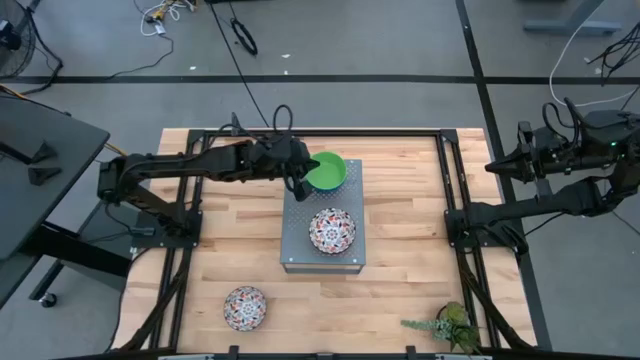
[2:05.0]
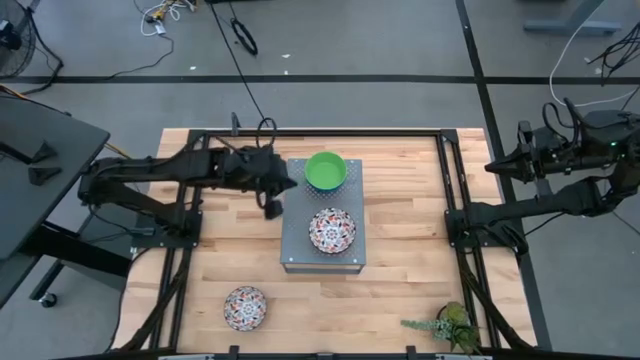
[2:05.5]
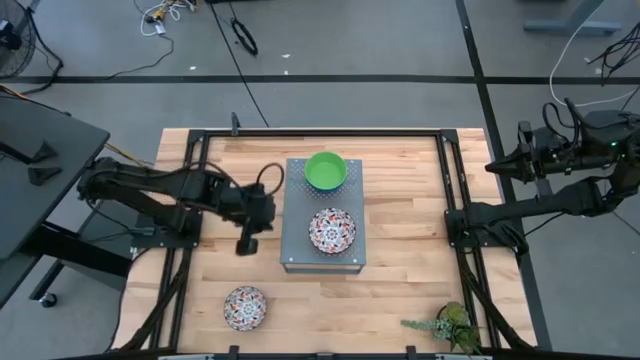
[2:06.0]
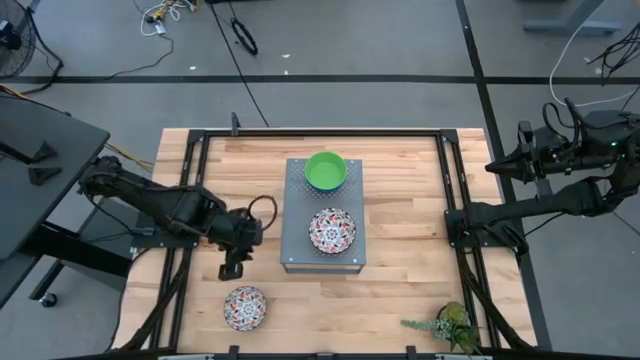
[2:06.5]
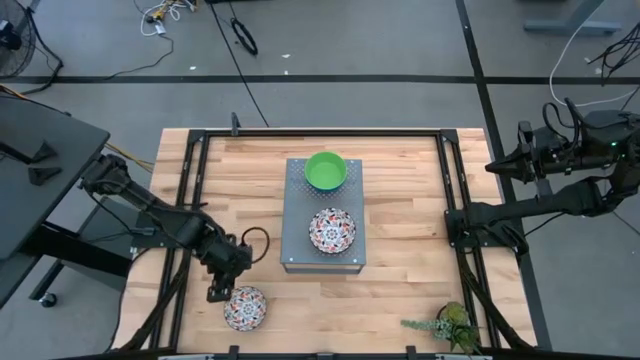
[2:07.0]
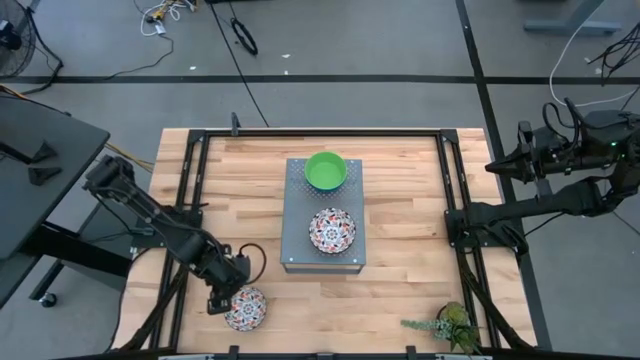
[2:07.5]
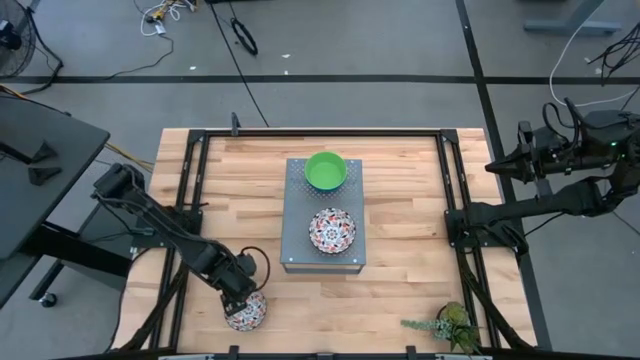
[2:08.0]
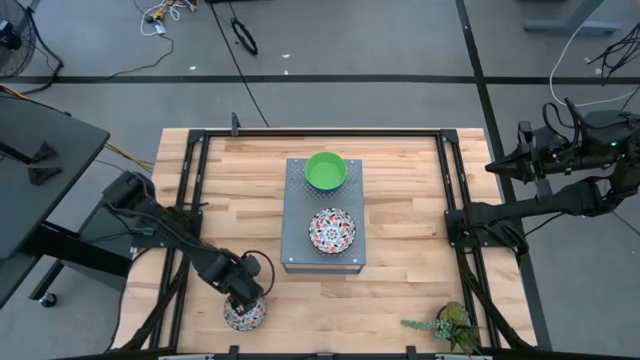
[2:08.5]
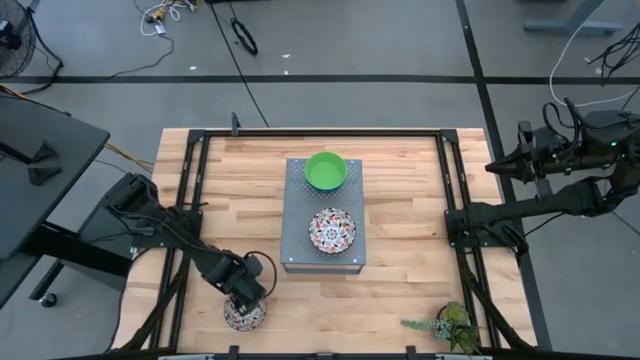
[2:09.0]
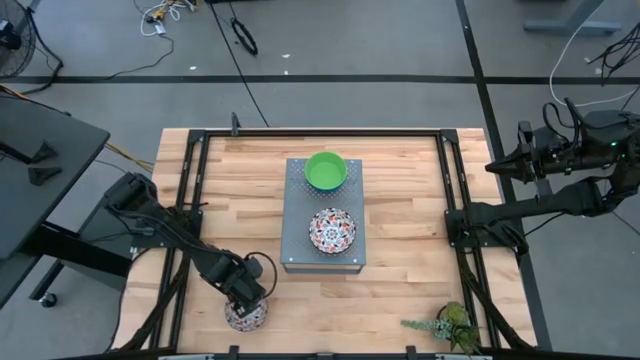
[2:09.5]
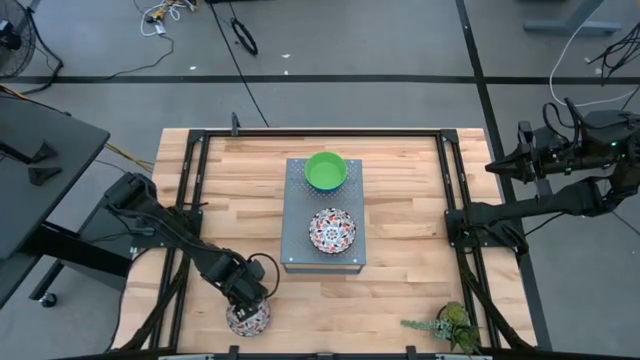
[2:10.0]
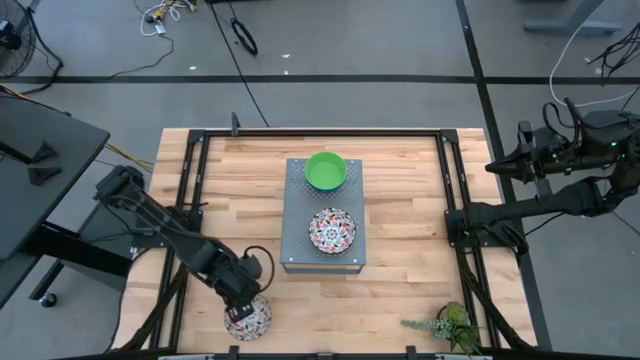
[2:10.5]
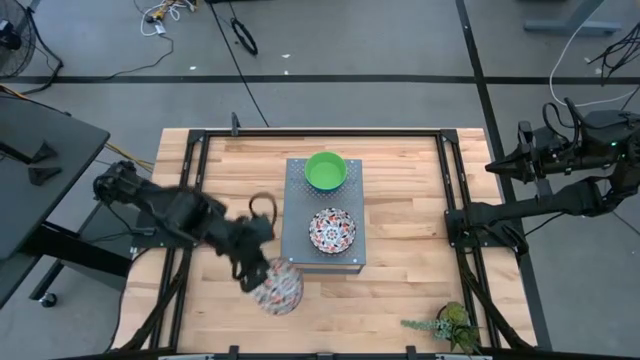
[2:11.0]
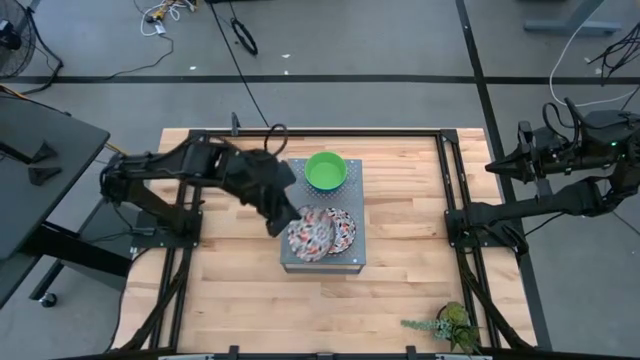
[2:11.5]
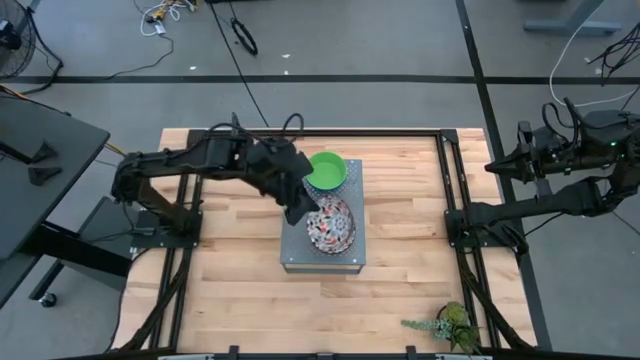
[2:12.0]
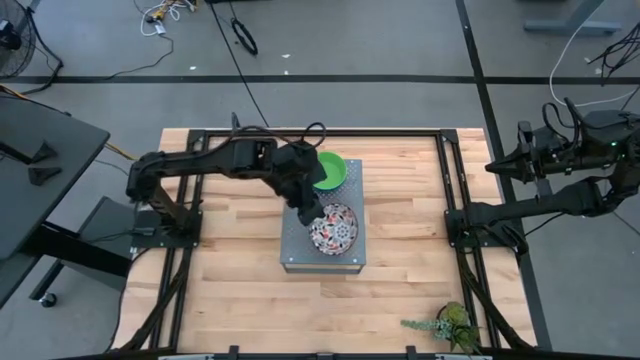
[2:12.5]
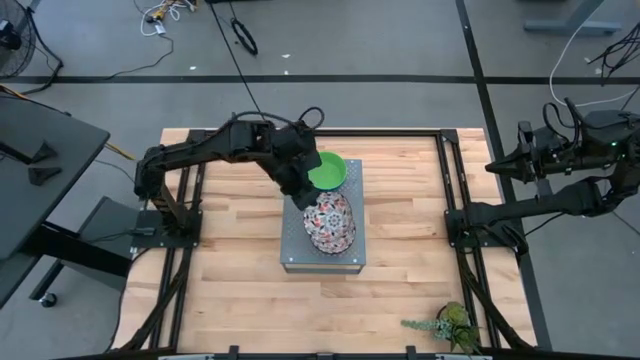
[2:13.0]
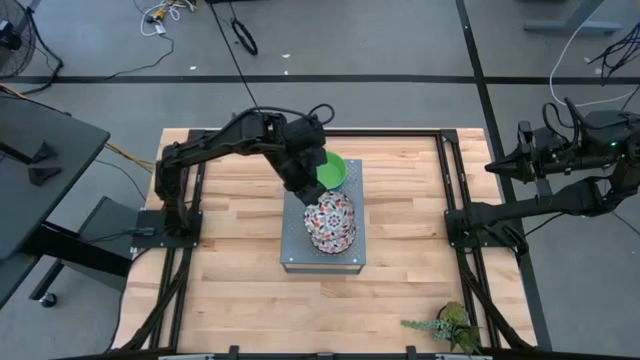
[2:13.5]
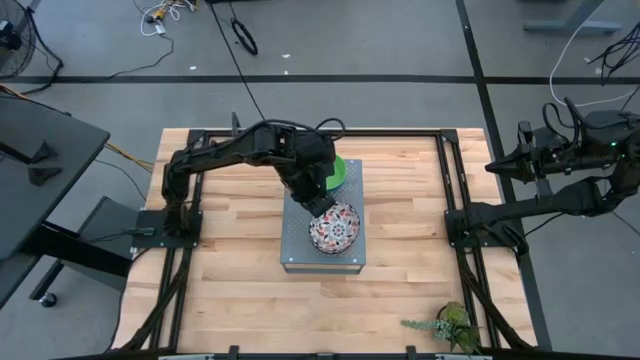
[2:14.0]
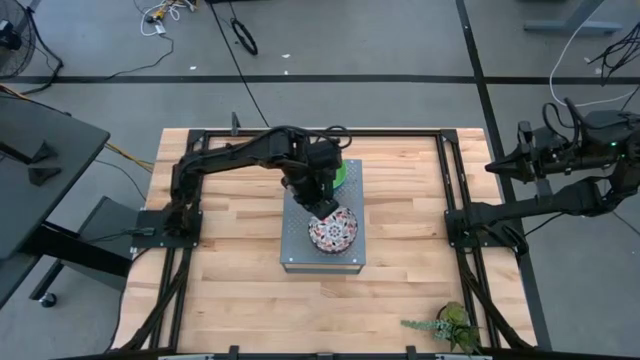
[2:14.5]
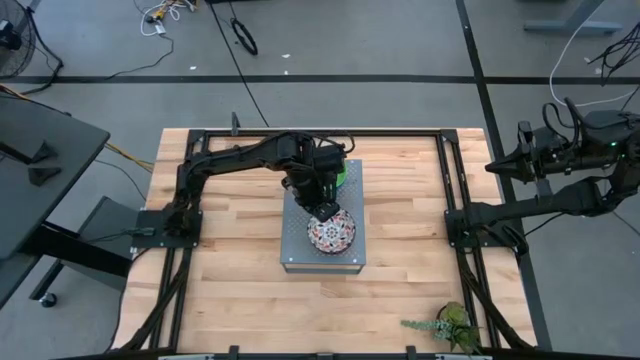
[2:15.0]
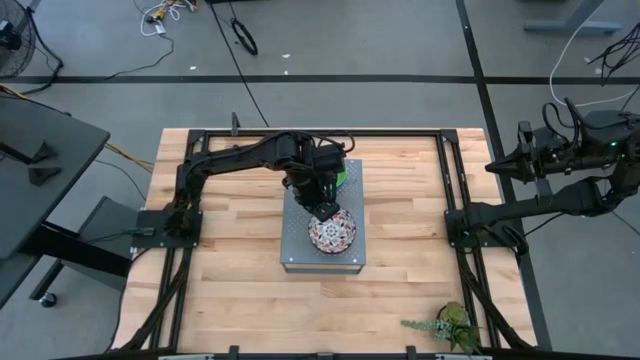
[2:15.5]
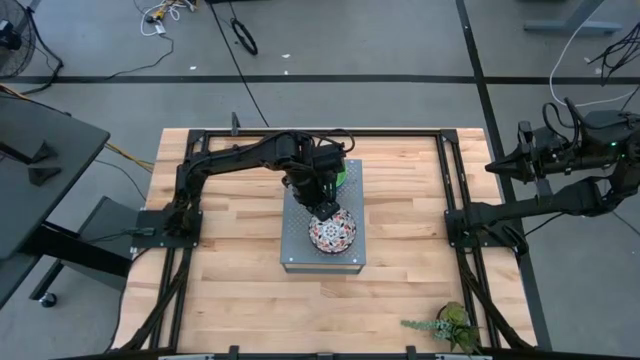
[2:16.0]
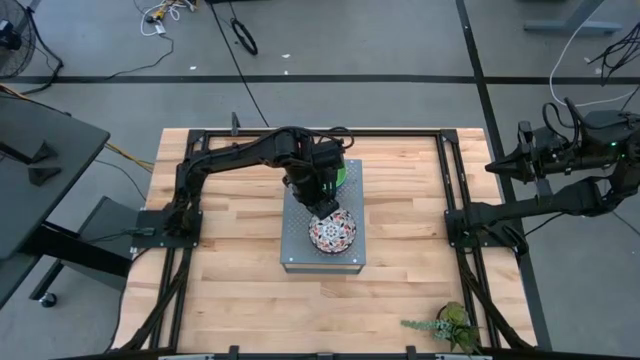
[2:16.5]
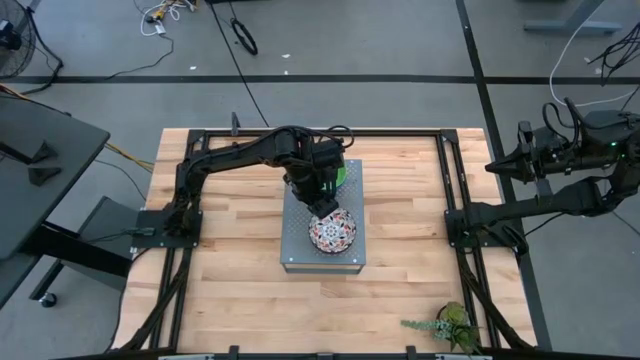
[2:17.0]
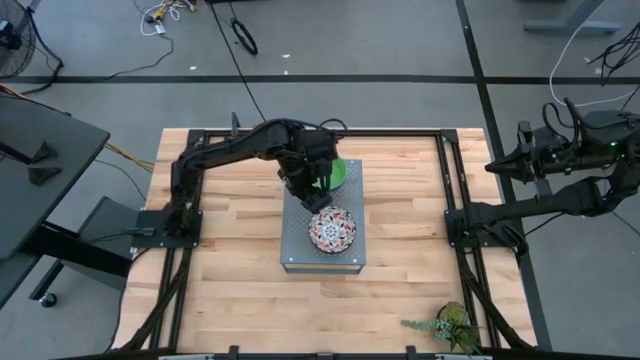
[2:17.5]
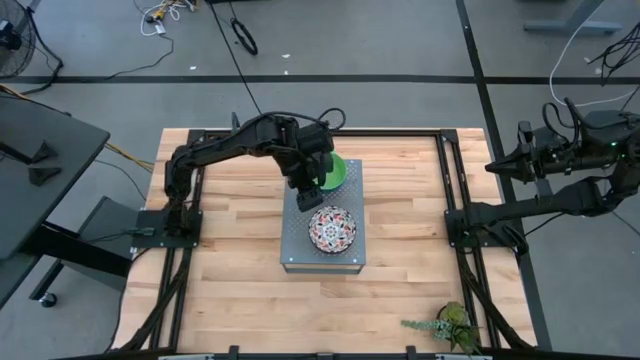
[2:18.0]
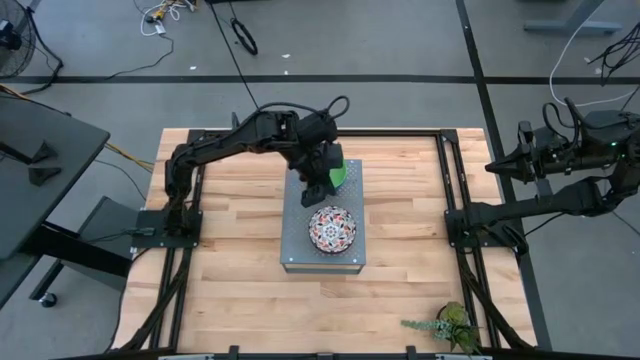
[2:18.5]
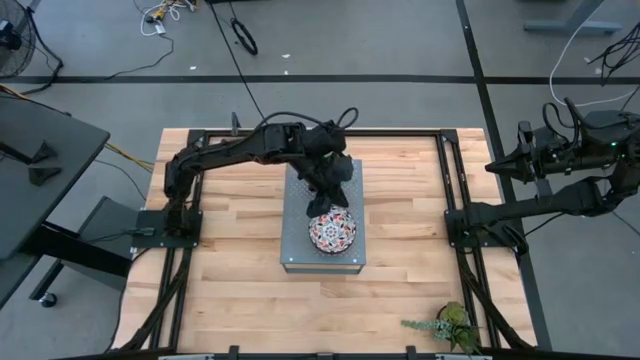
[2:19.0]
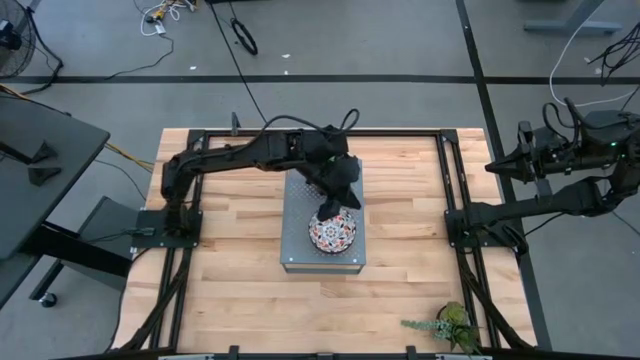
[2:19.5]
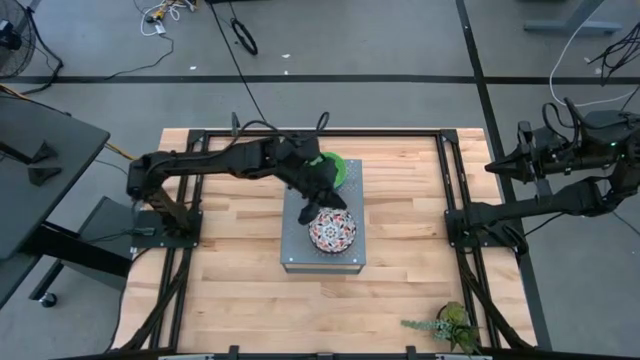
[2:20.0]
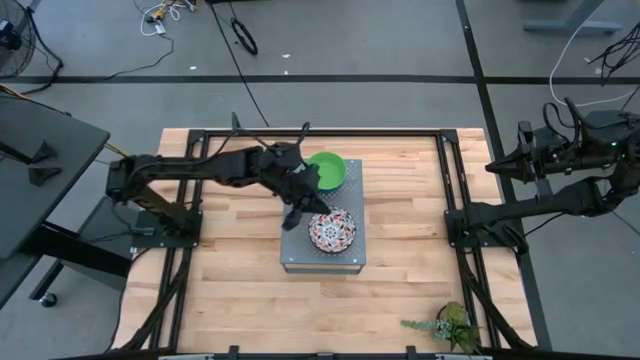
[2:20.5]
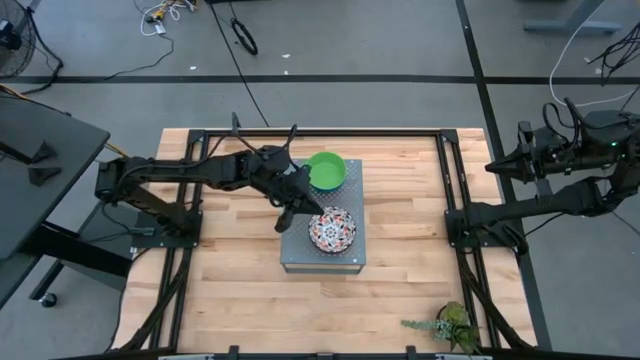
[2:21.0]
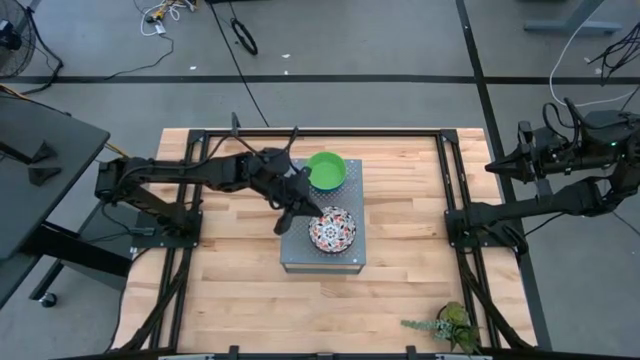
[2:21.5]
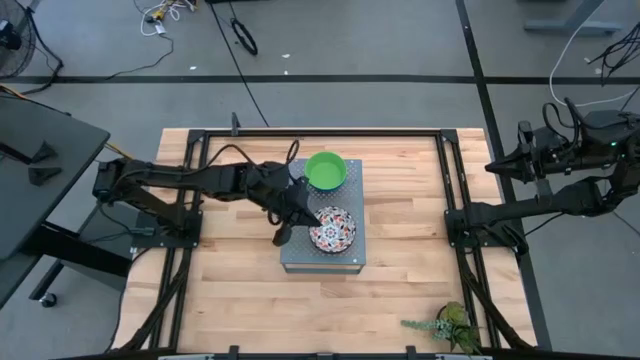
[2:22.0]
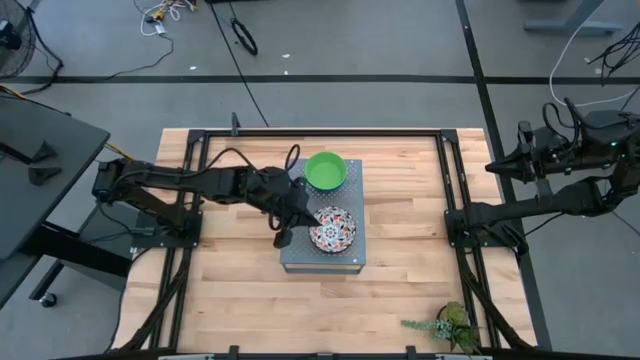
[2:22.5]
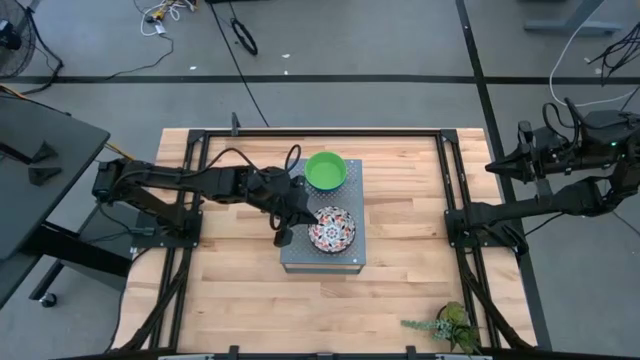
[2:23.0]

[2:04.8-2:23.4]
Task: Pick & Place Mini bowls
Stack the white patterned bowl on top of the white patterned bowl on the shelf
